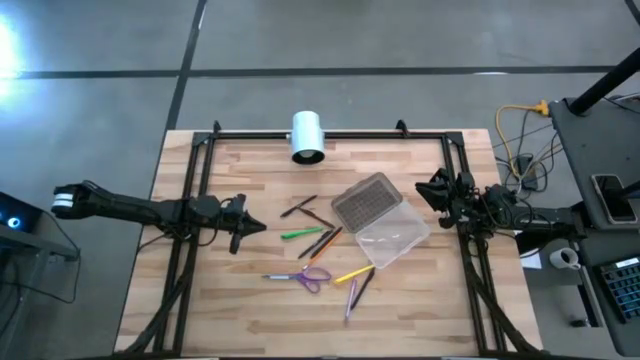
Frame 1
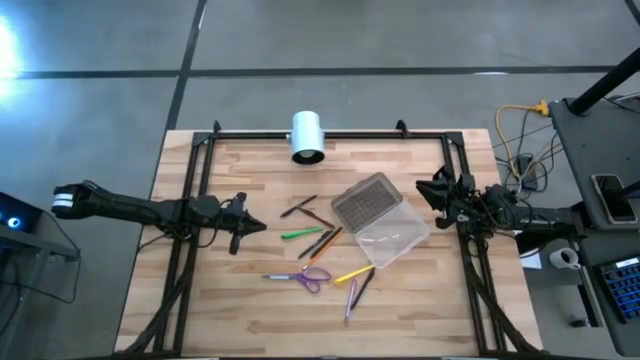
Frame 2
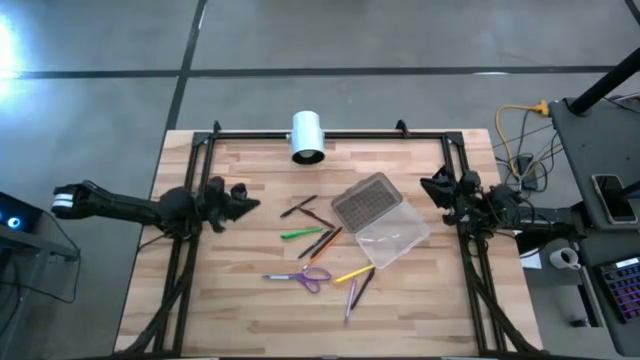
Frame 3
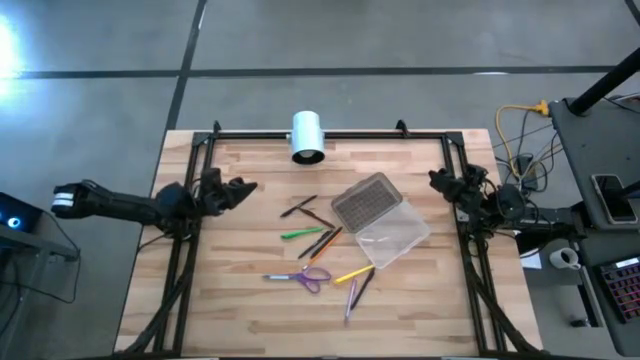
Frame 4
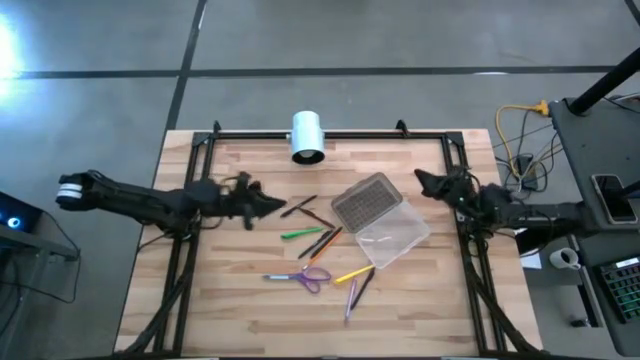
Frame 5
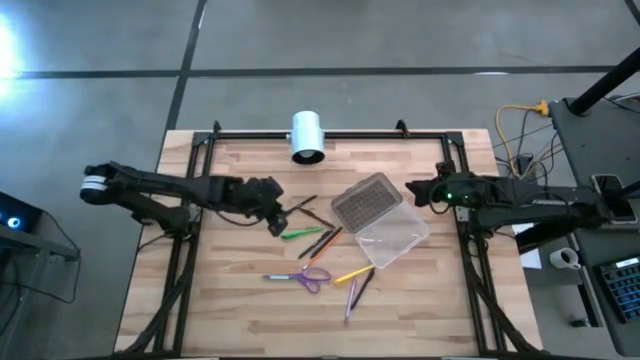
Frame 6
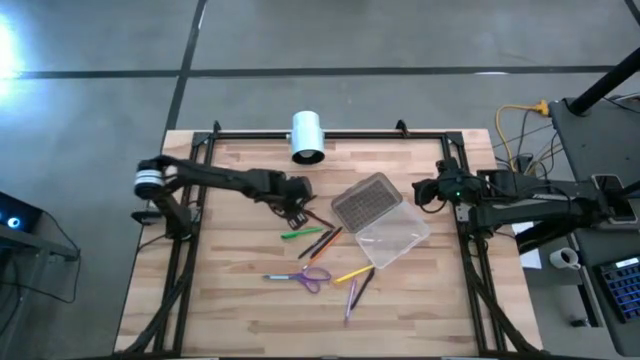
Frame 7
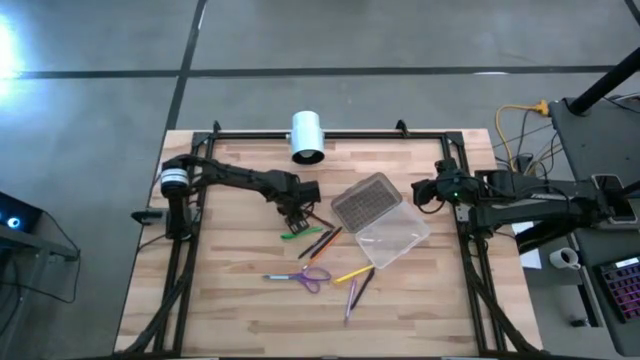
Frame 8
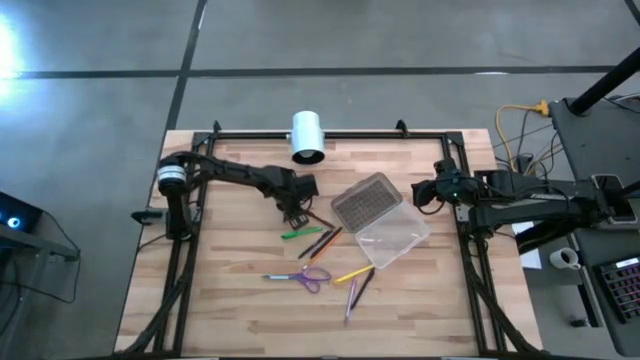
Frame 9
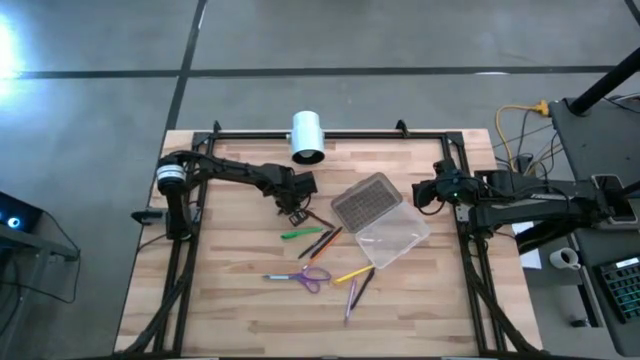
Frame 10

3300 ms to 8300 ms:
Task: Pick & place school supplies into a supply box
Put the black pen into the supply box

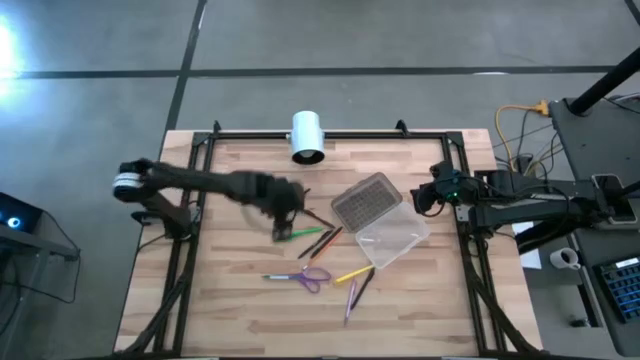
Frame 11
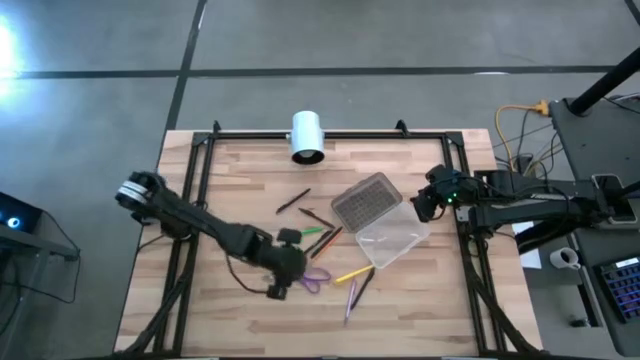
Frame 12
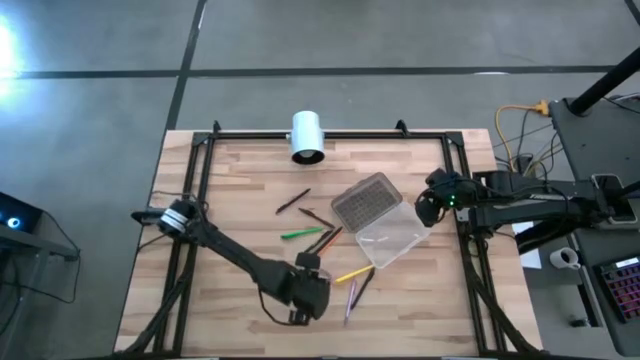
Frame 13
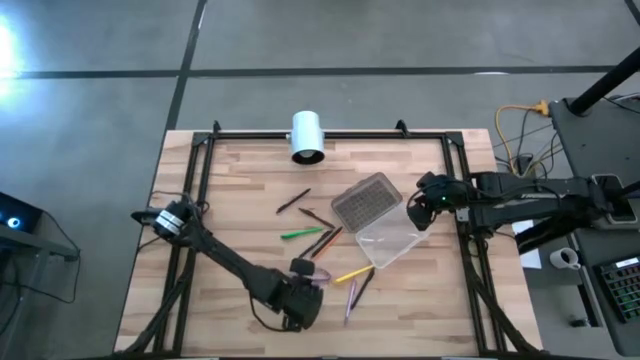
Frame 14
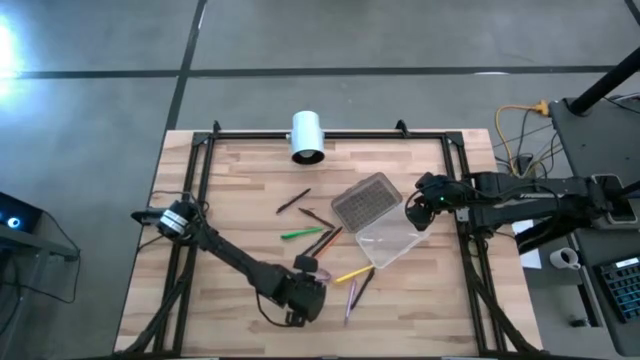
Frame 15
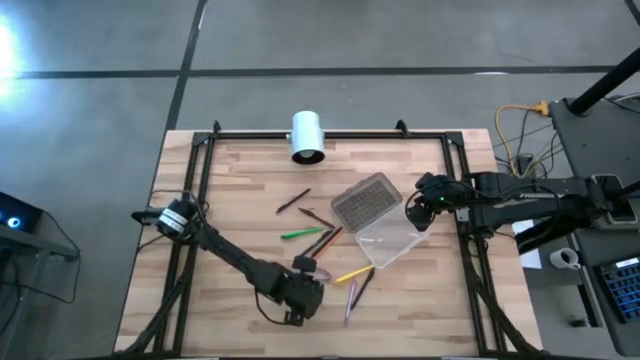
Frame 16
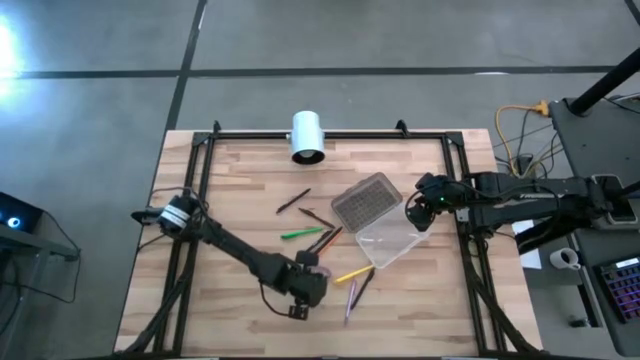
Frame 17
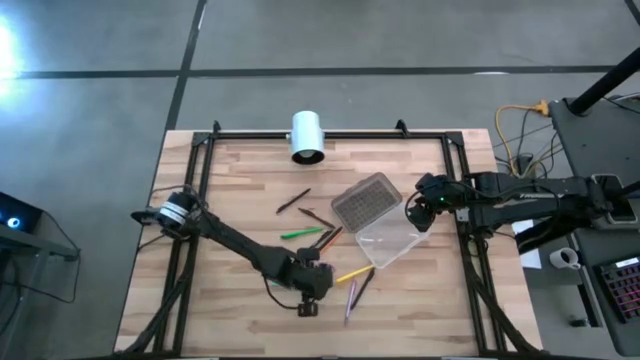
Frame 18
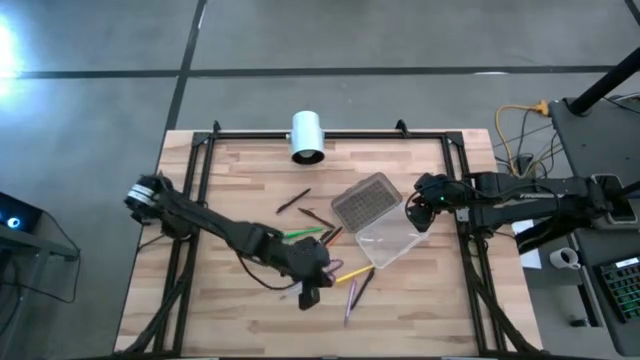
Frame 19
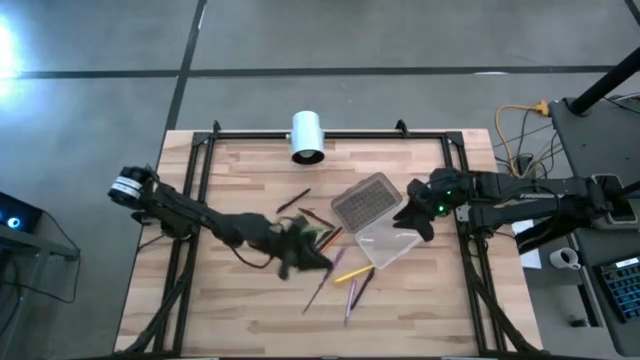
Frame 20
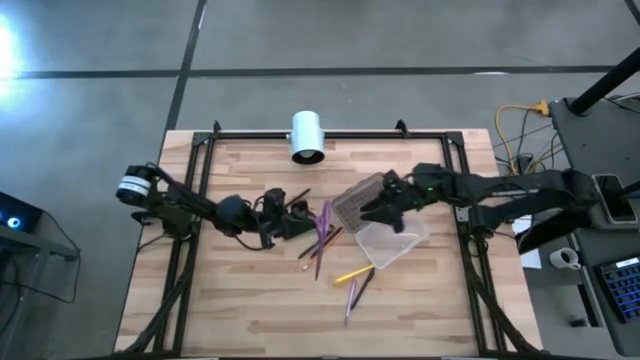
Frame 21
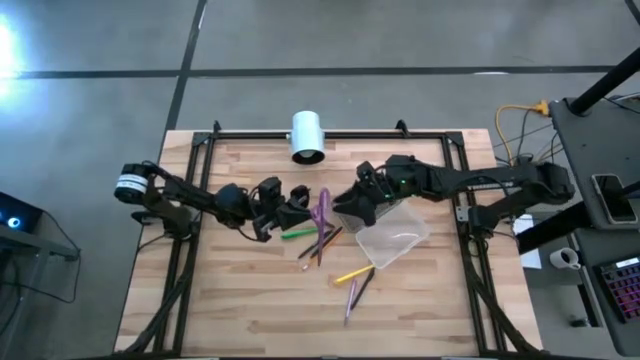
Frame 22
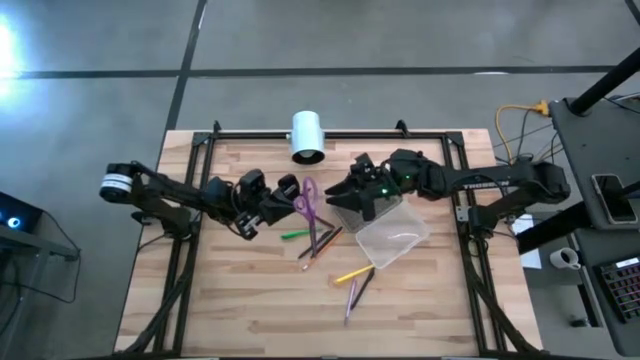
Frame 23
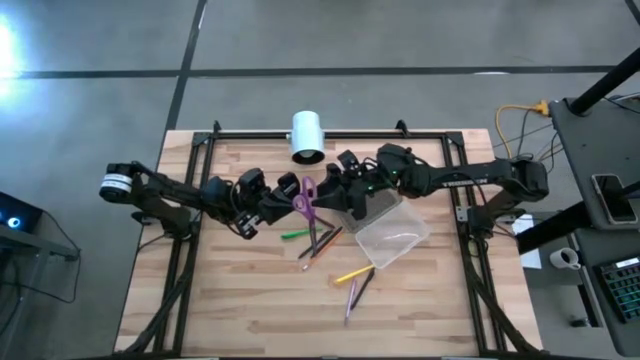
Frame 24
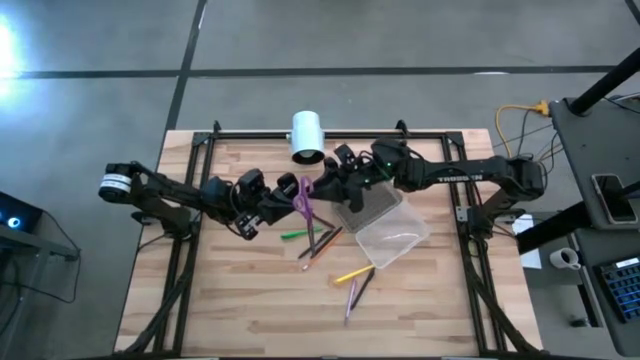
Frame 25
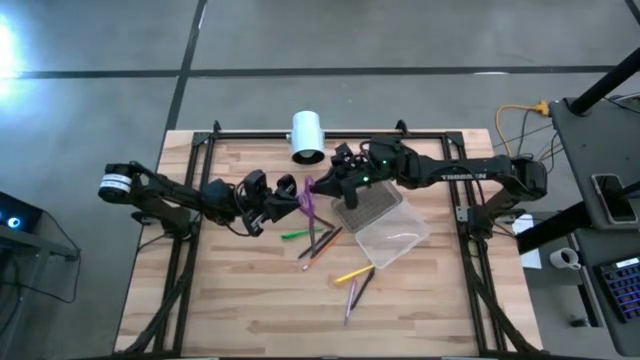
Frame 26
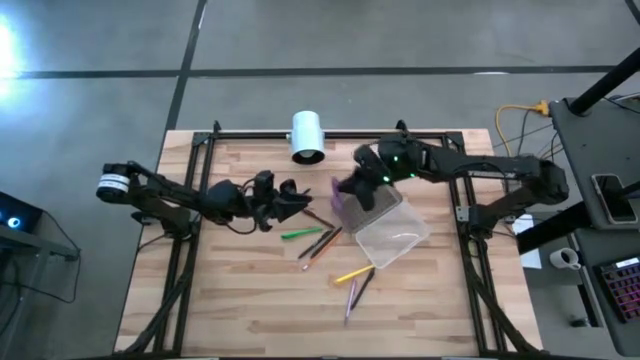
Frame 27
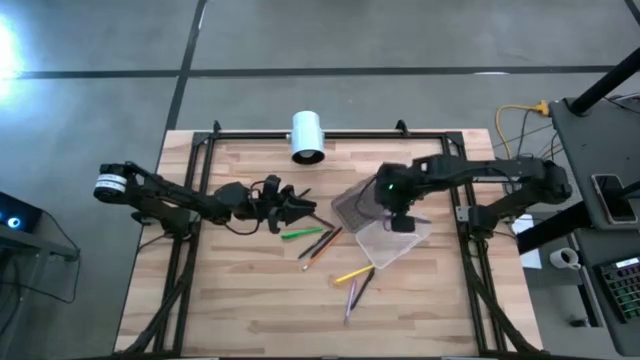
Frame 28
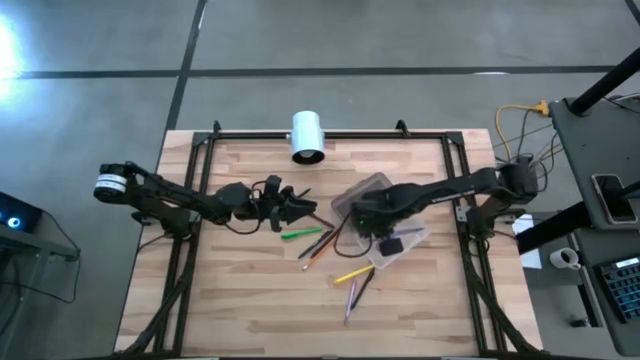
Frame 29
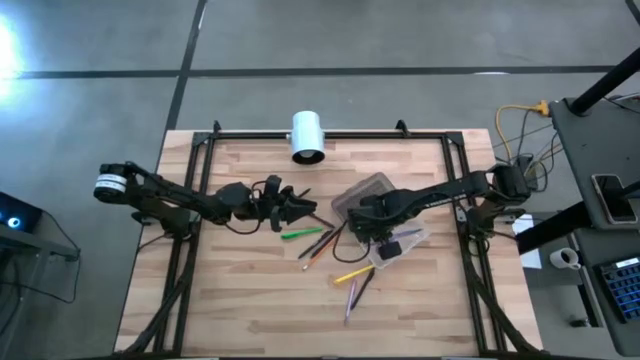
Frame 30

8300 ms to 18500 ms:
Put the purple scissors into the supply box

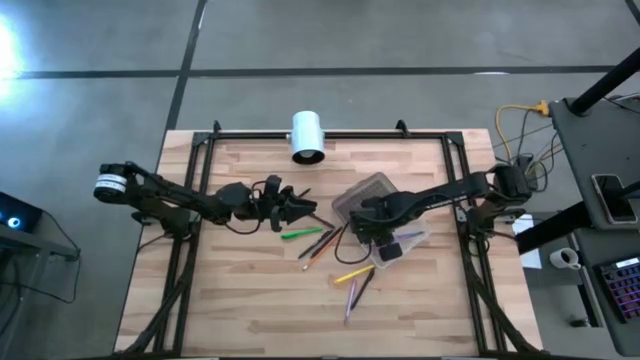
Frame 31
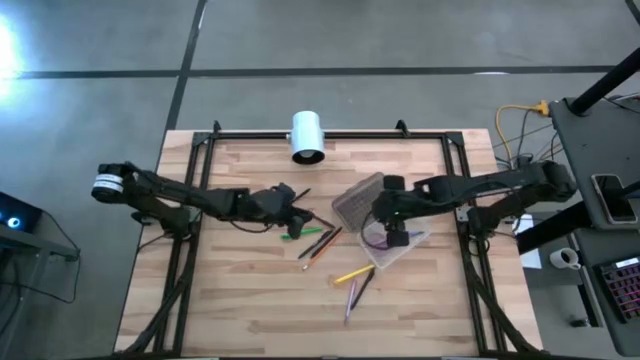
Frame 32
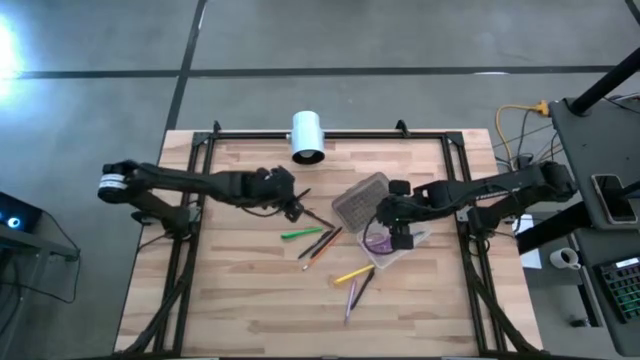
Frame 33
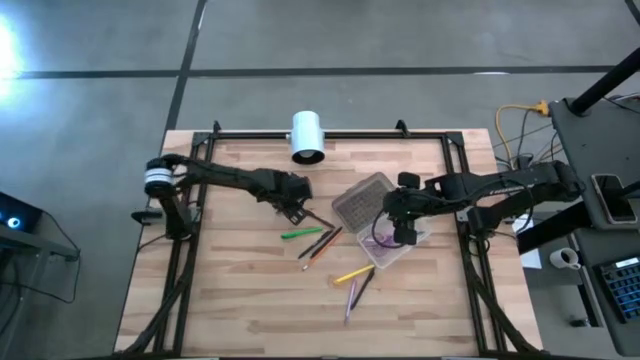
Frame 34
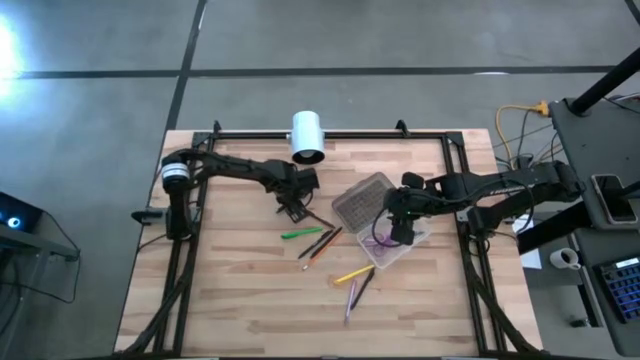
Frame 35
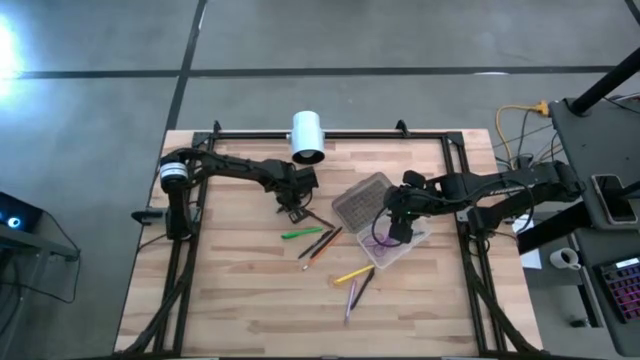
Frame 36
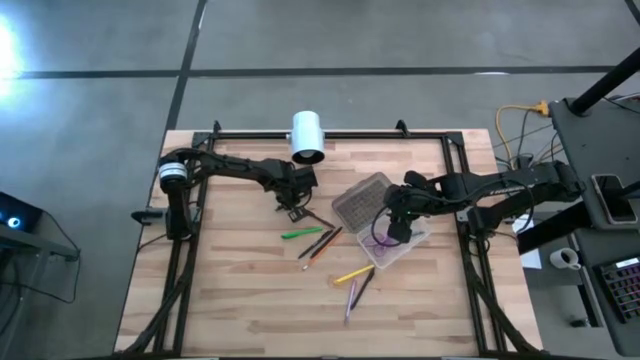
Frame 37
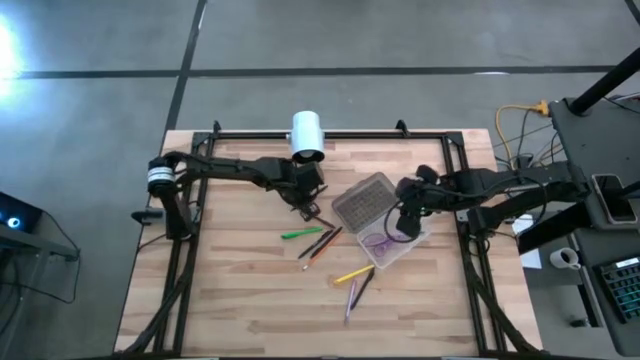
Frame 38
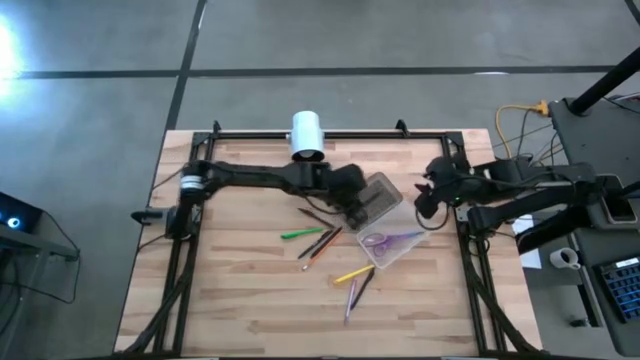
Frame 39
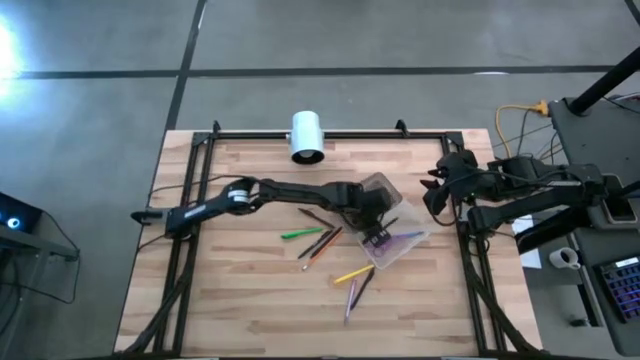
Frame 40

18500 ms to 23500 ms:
Put the black pen into the supply box

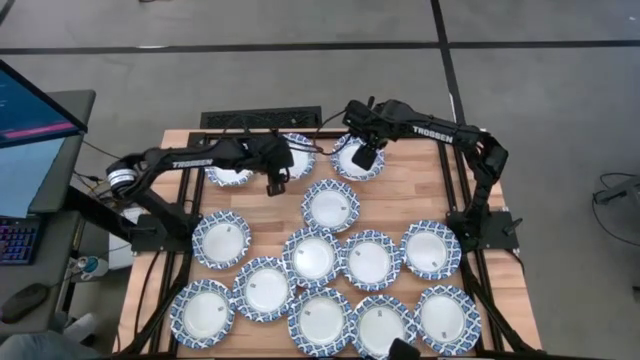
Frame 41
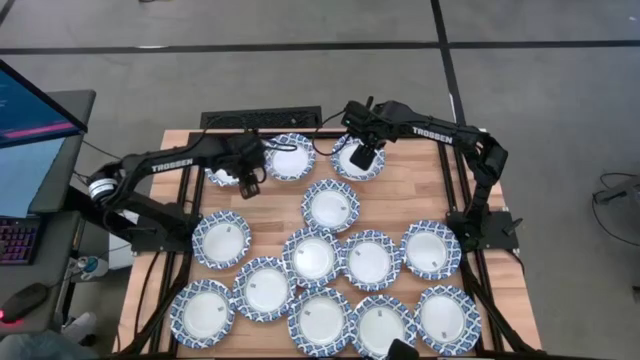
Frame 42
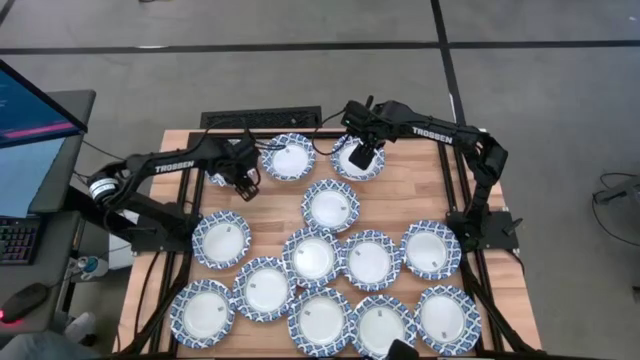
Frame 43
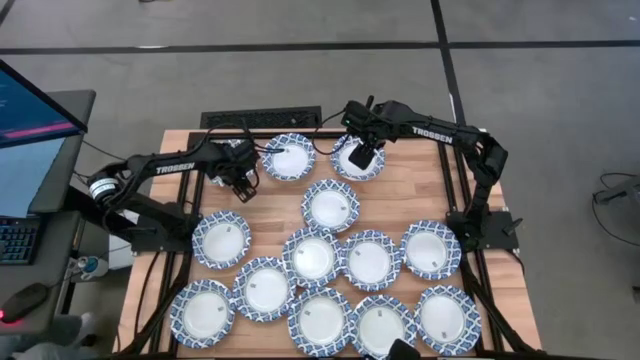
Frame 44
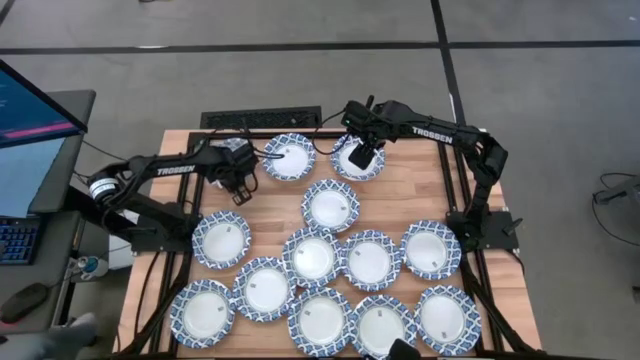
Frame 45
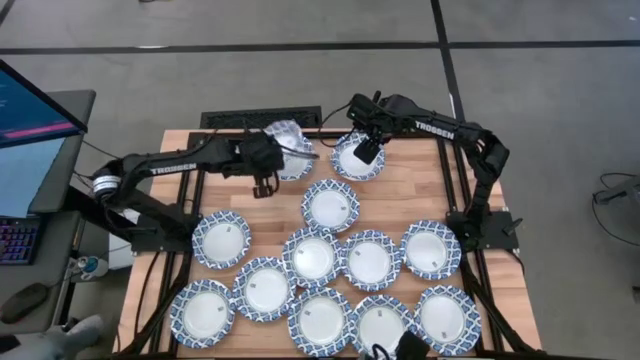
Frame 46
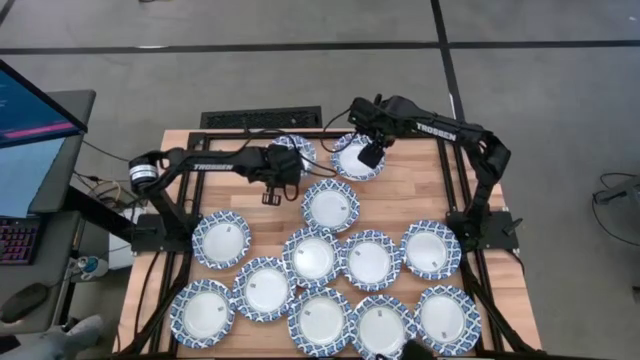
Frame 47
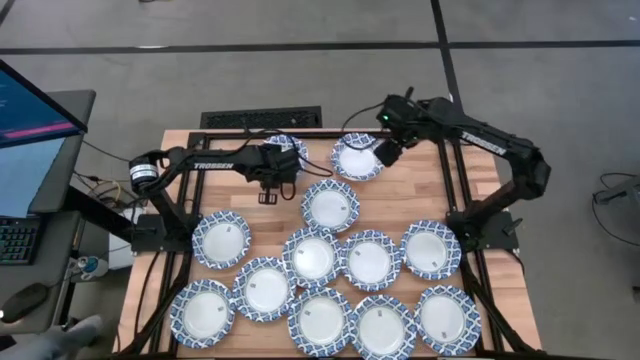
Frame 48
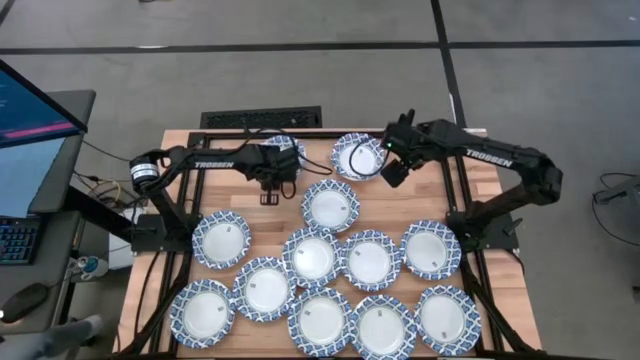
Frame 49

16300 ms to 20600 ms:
Task: Nest bowls inside each other
Stack the white bowl on the stacked white bowls
